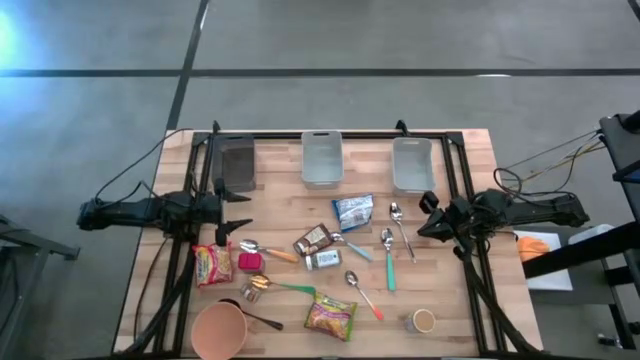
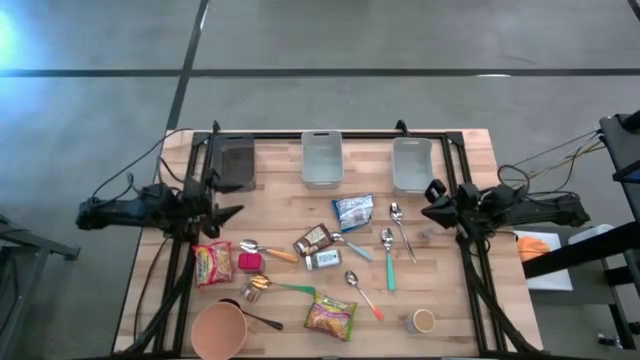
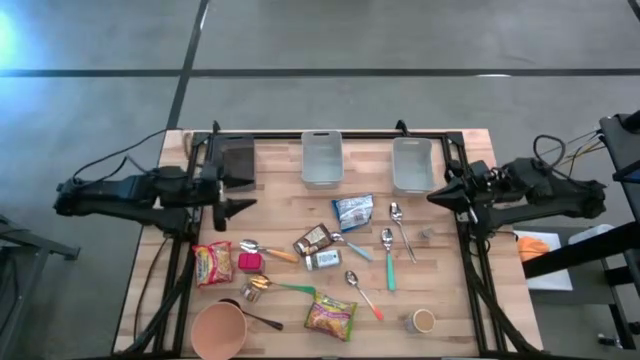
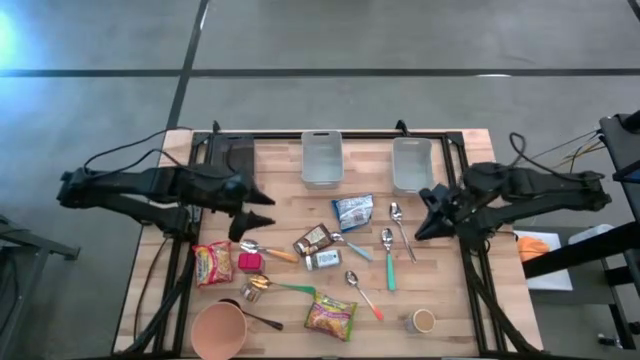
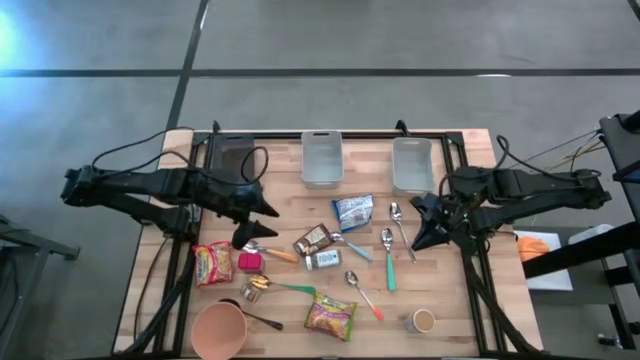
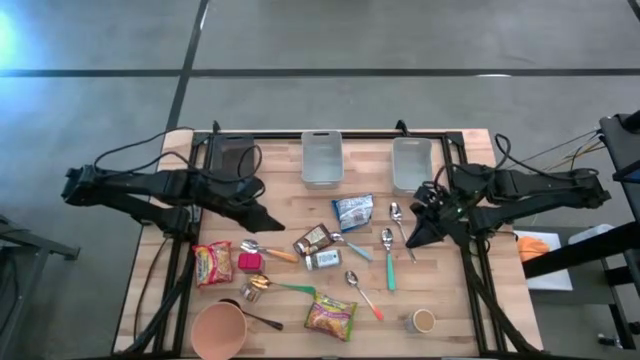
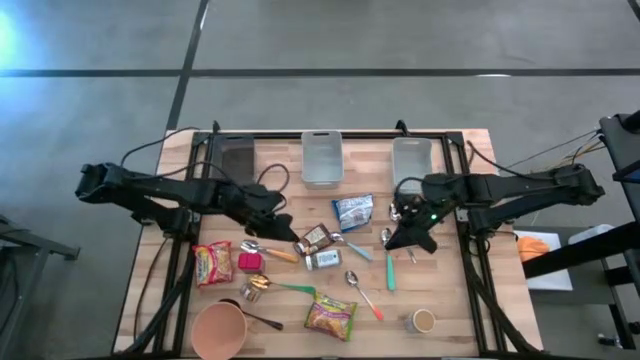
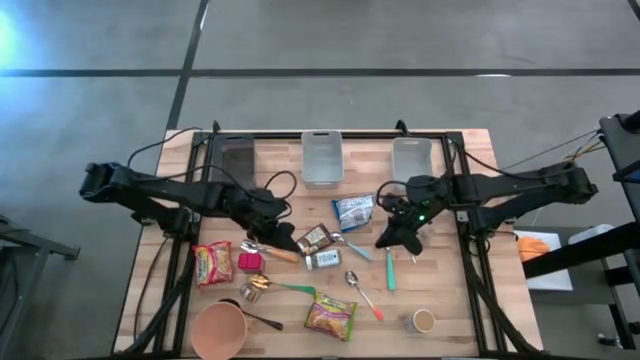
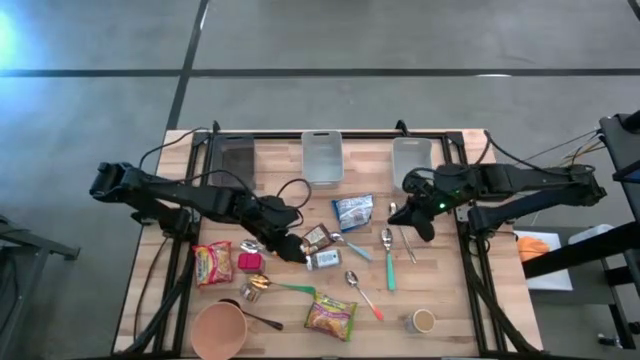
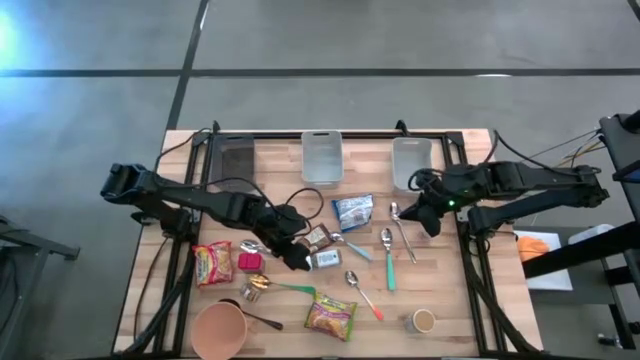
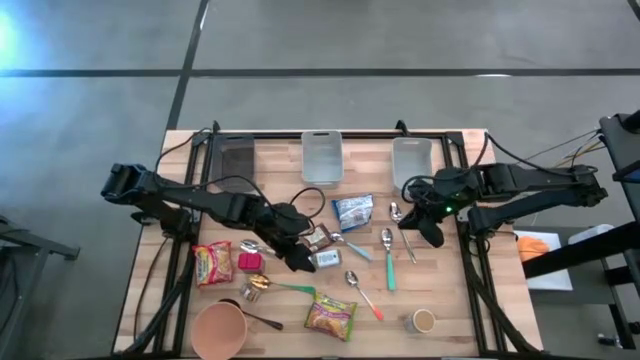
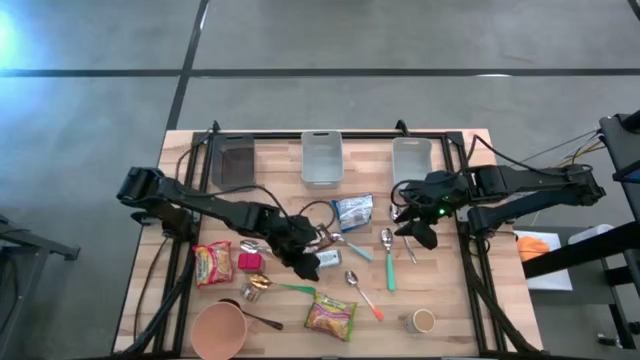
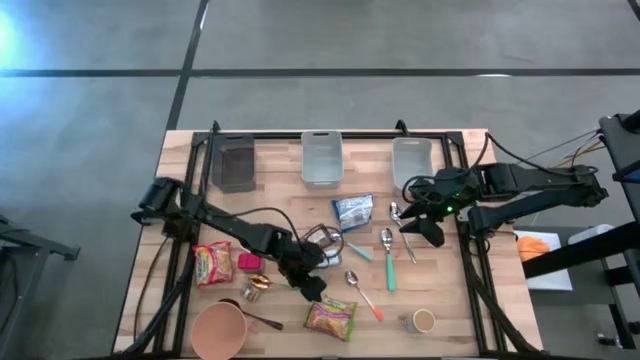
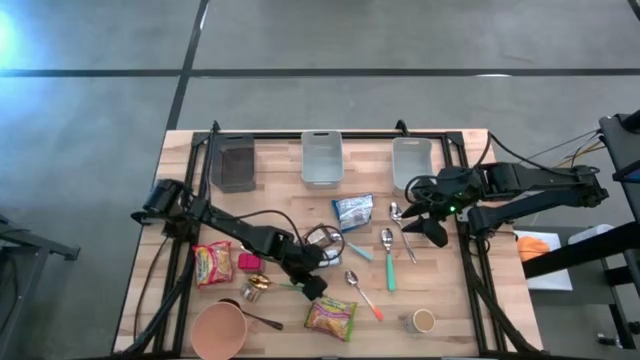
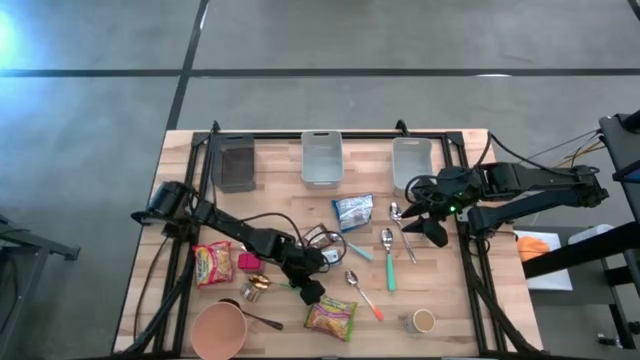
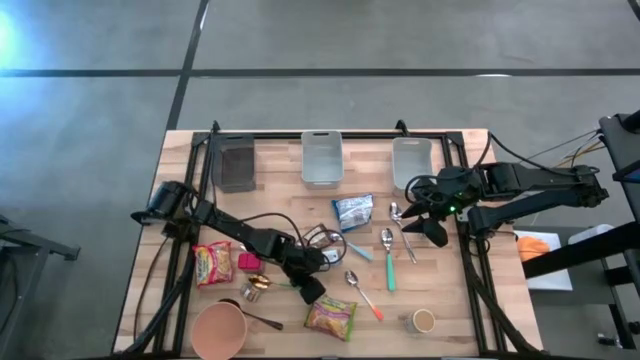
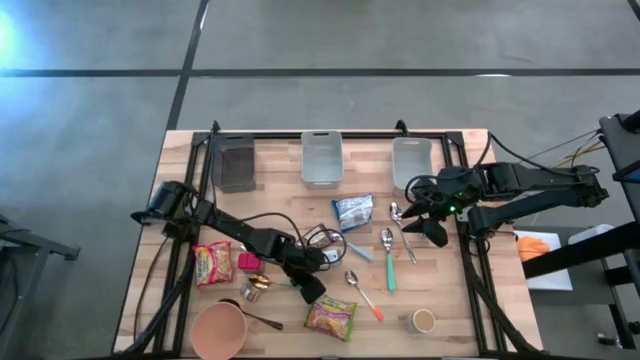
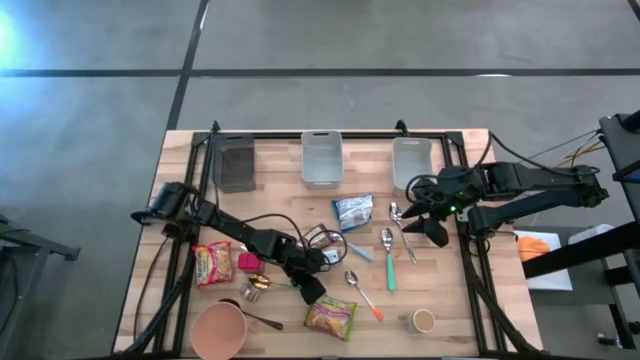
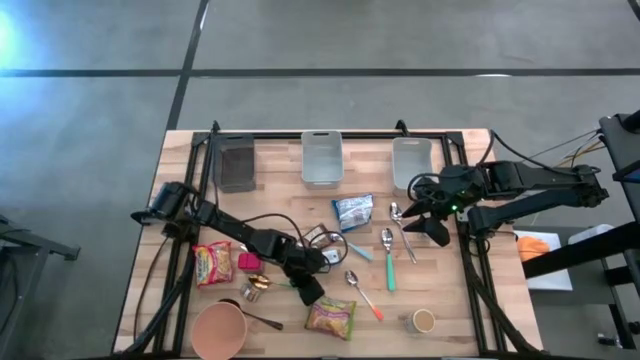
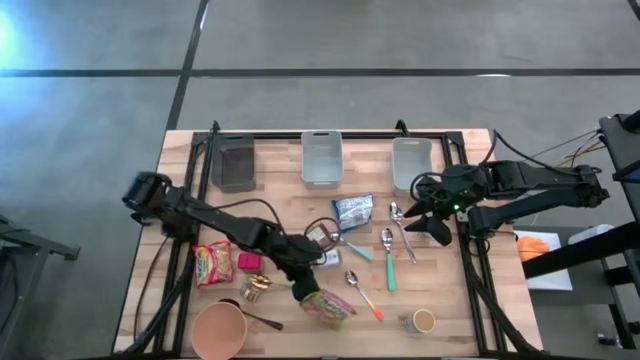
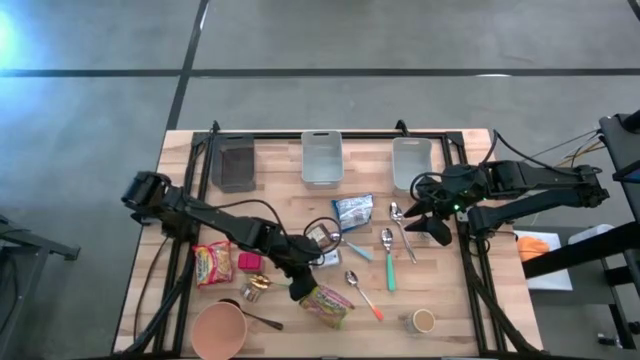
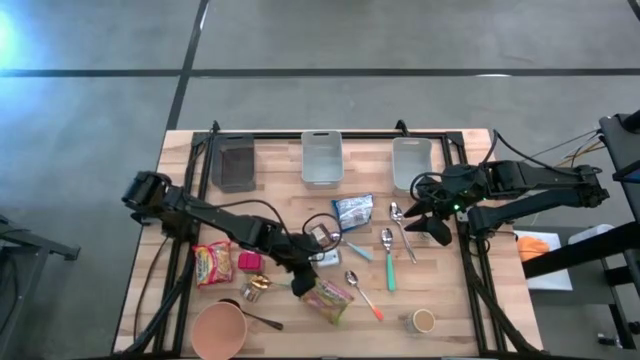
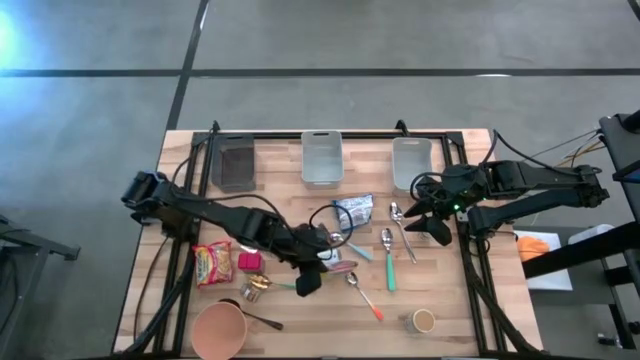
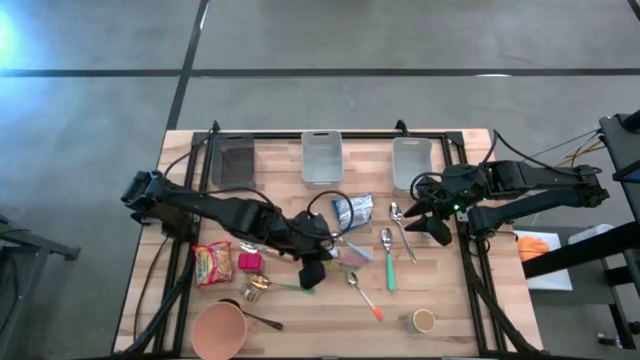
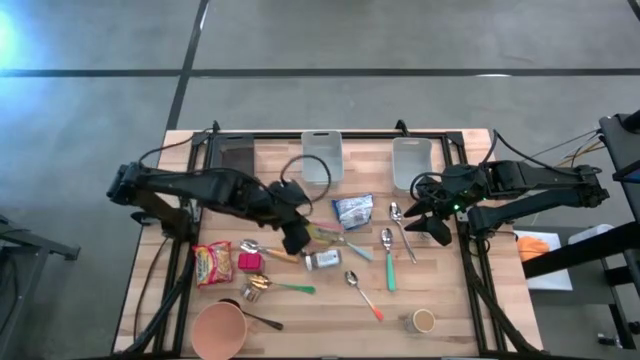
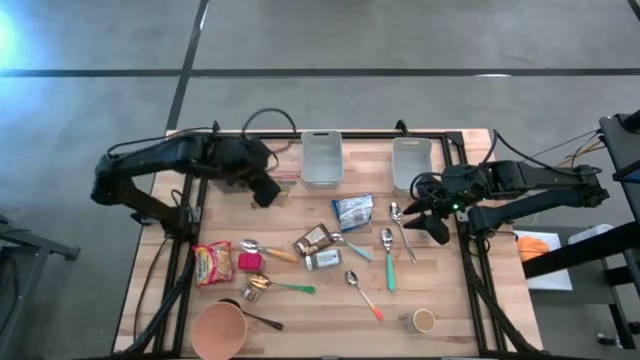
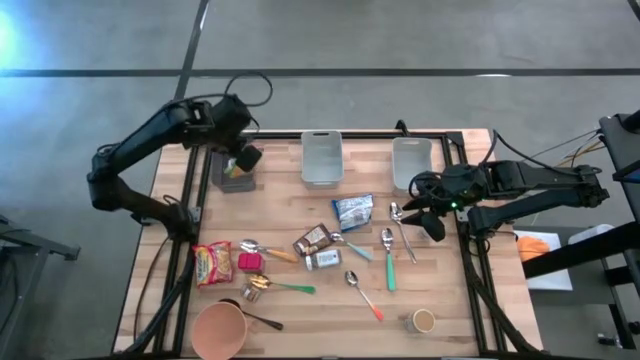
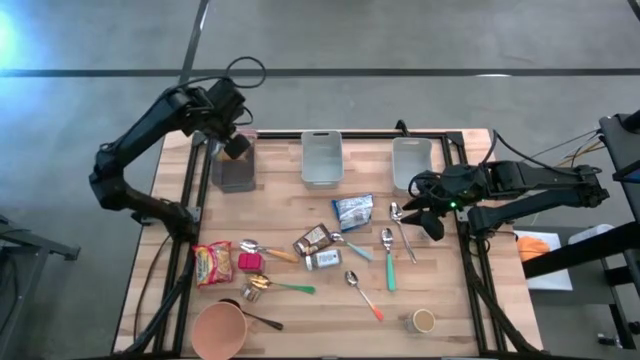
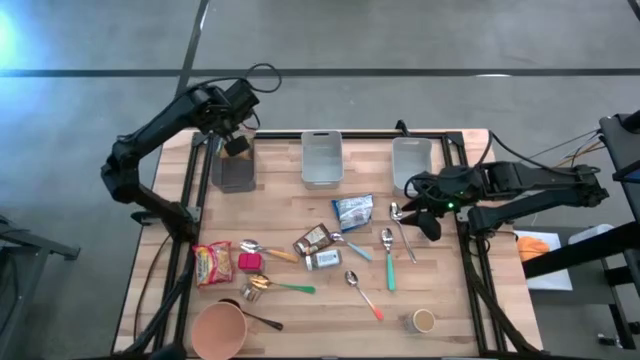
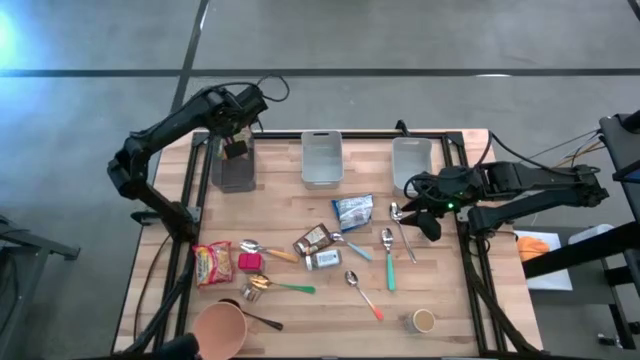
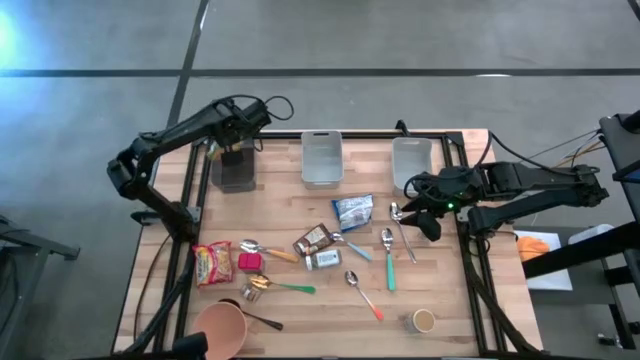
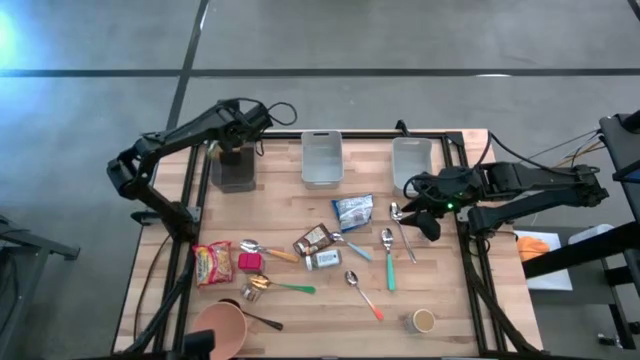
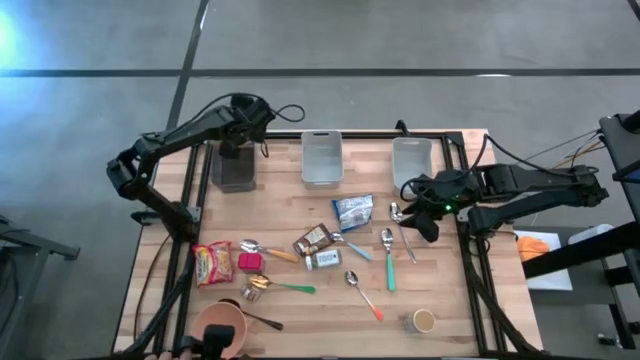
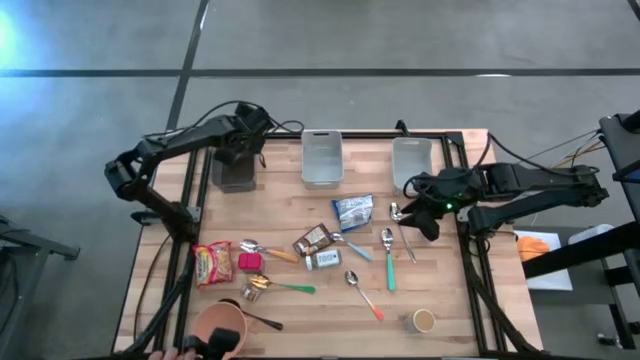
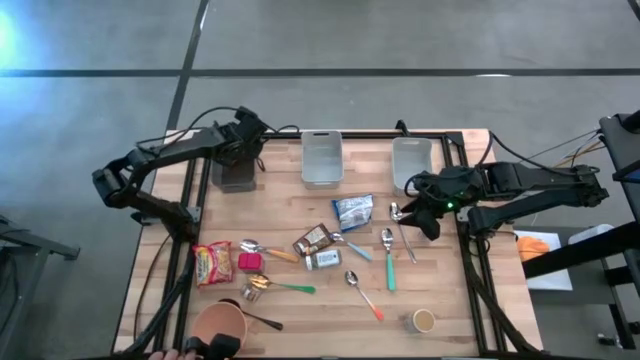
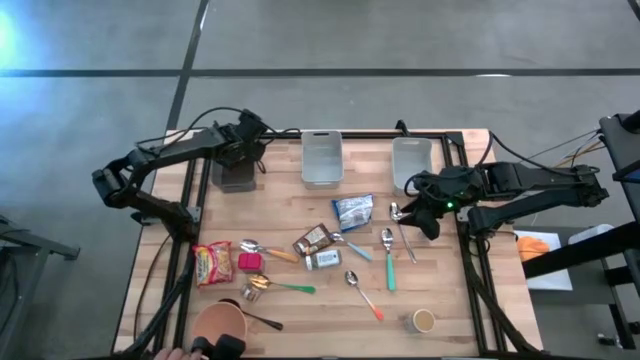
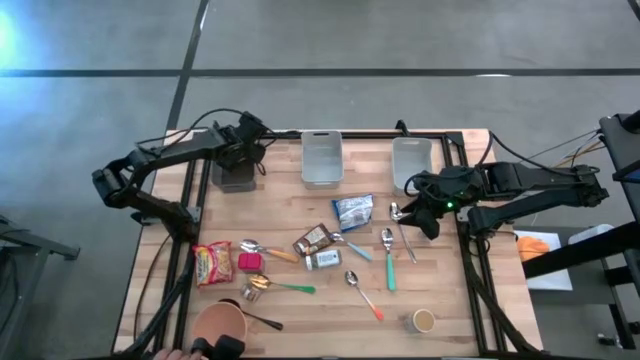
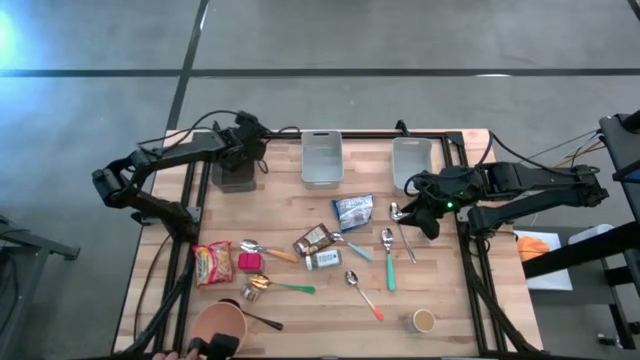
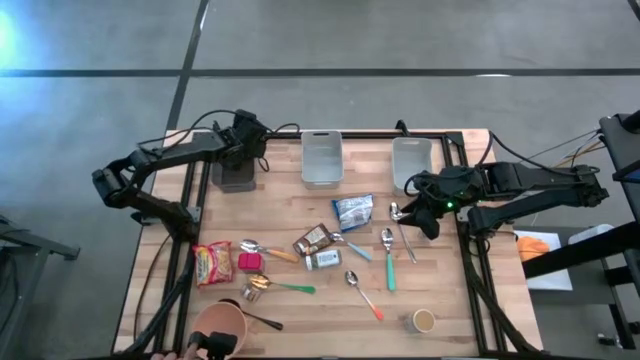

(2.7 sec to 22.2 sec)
Put the green noodle pack into the black bin
